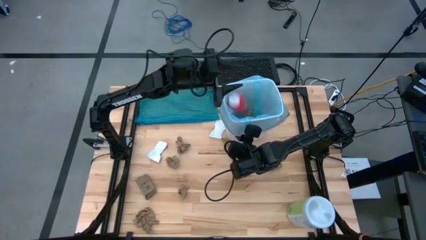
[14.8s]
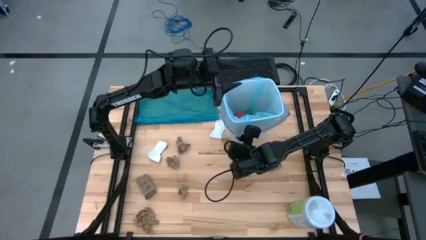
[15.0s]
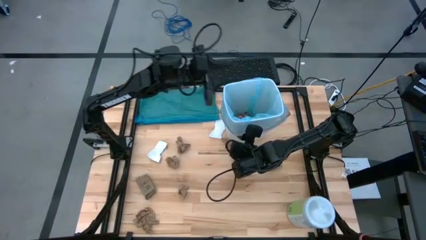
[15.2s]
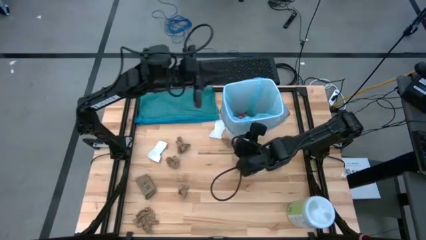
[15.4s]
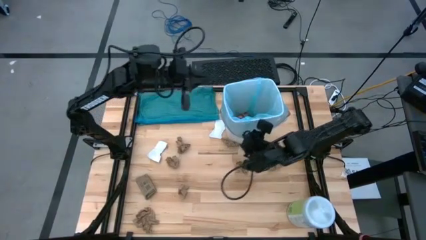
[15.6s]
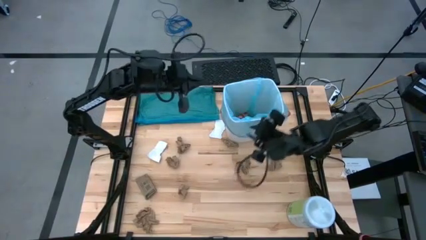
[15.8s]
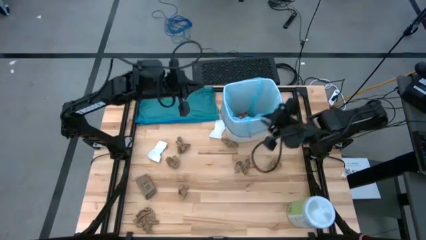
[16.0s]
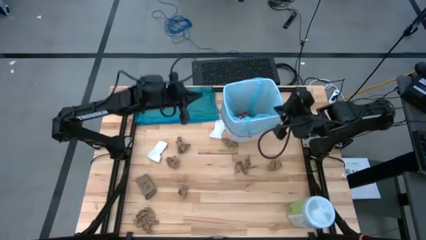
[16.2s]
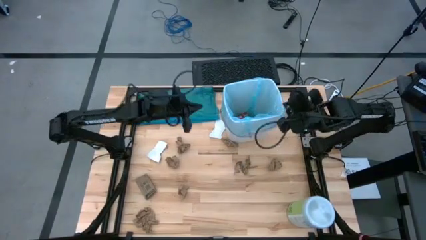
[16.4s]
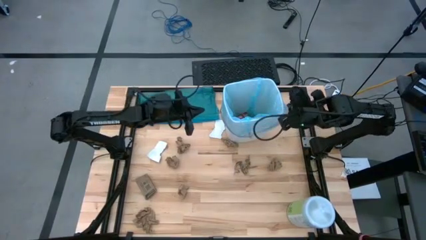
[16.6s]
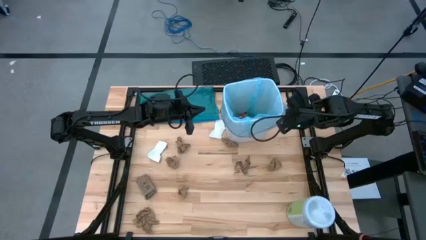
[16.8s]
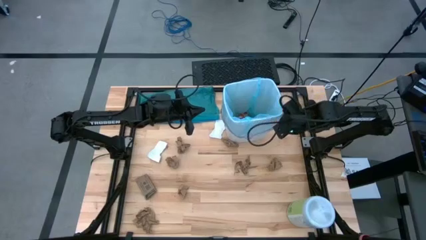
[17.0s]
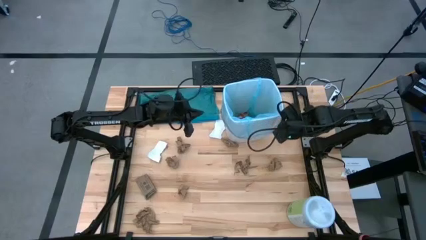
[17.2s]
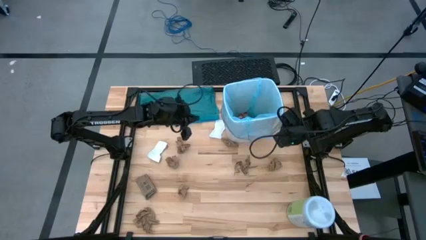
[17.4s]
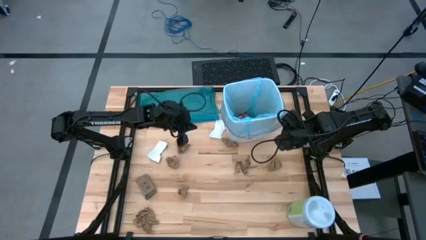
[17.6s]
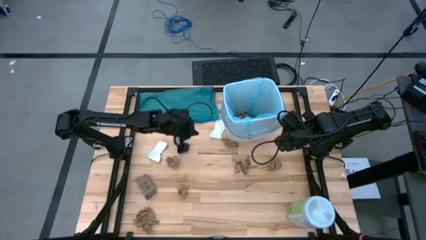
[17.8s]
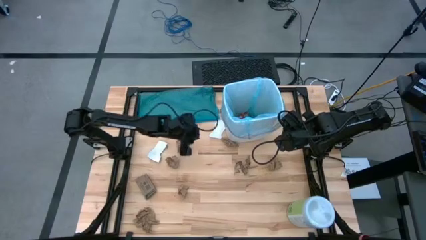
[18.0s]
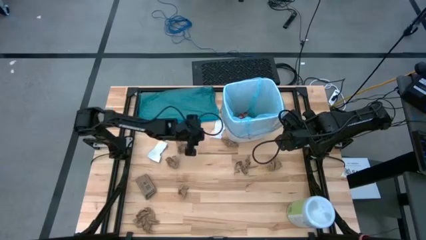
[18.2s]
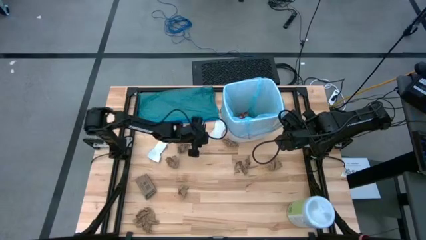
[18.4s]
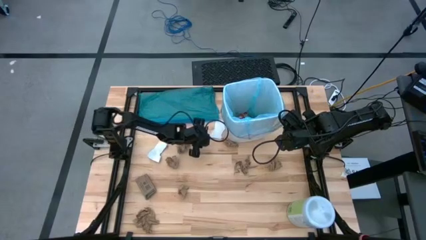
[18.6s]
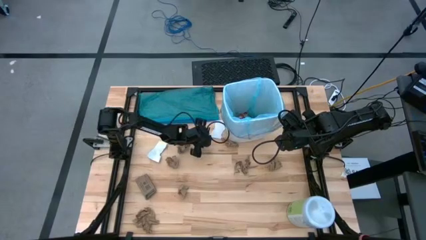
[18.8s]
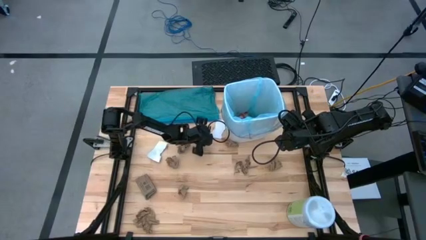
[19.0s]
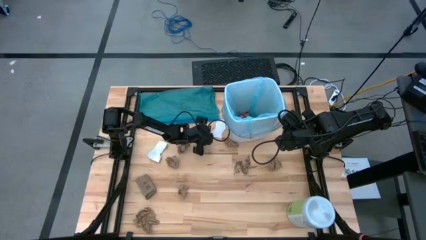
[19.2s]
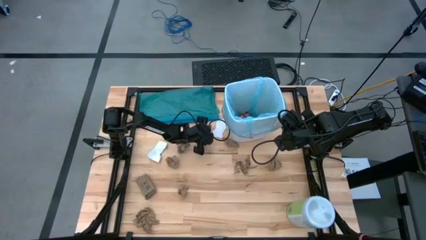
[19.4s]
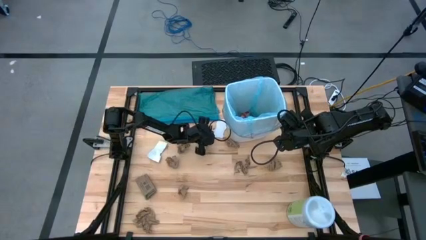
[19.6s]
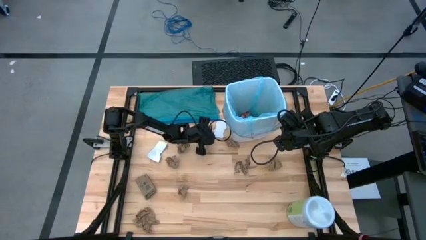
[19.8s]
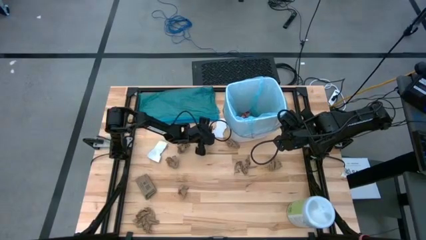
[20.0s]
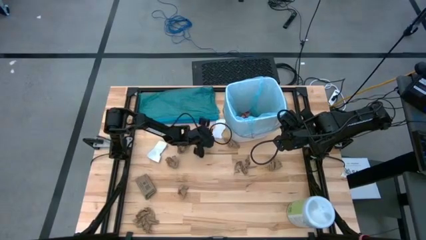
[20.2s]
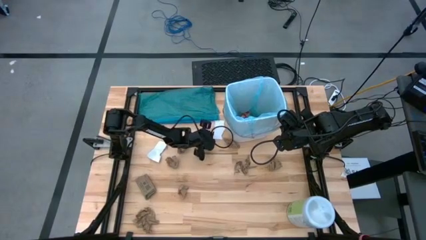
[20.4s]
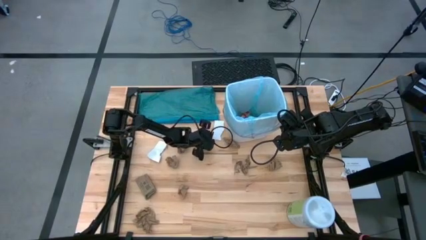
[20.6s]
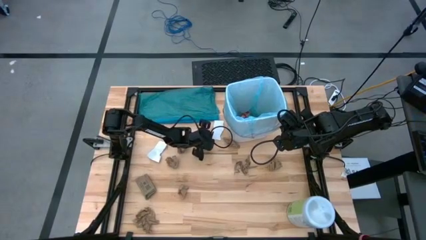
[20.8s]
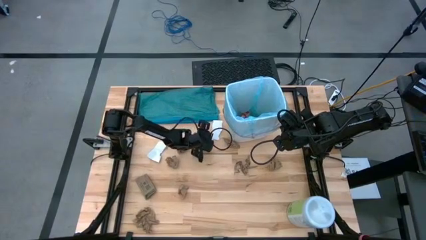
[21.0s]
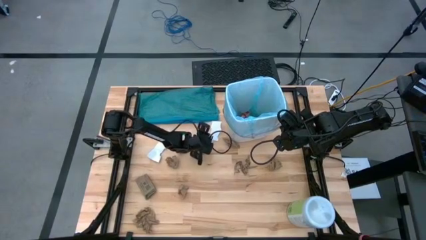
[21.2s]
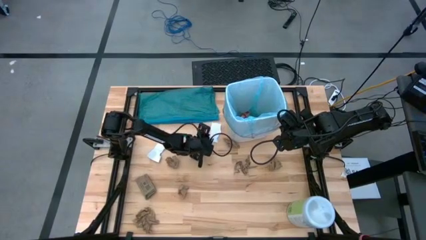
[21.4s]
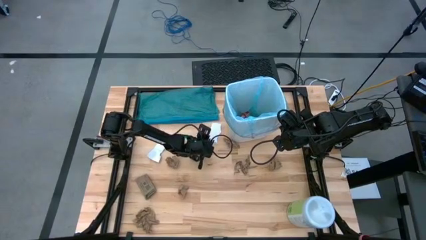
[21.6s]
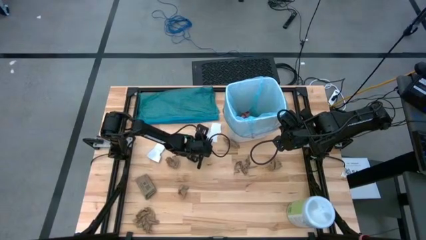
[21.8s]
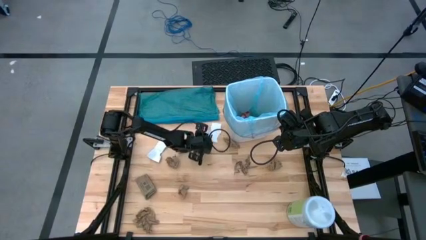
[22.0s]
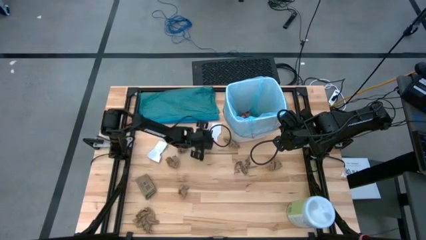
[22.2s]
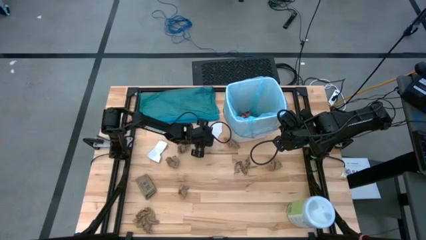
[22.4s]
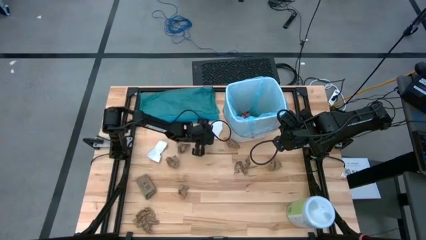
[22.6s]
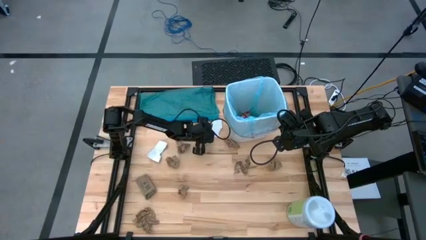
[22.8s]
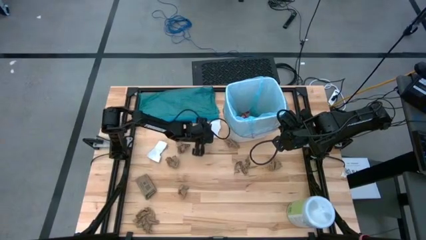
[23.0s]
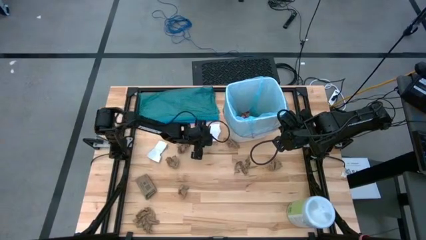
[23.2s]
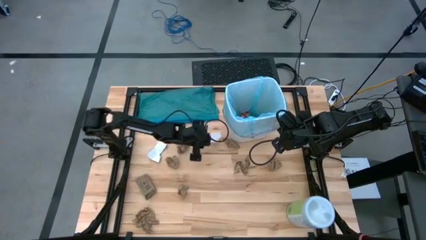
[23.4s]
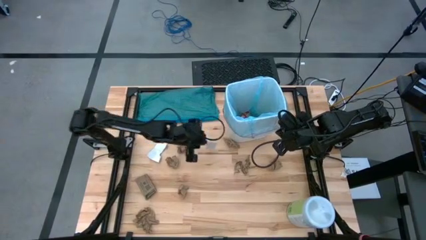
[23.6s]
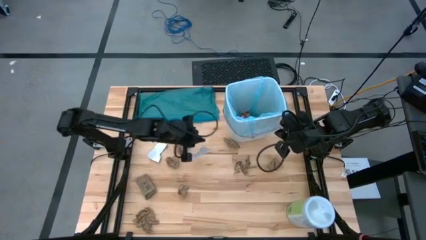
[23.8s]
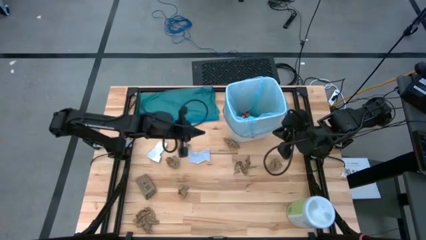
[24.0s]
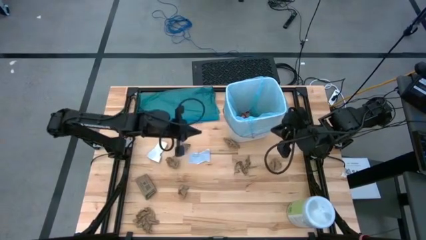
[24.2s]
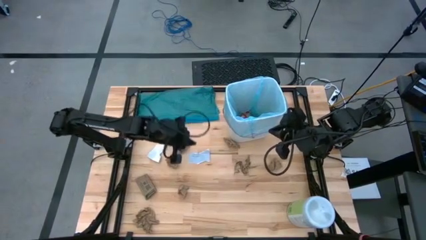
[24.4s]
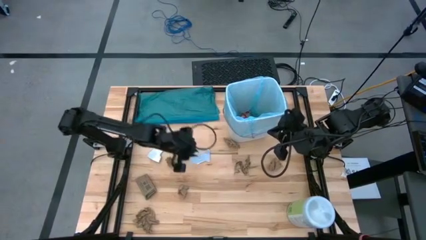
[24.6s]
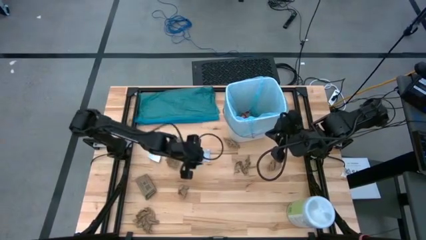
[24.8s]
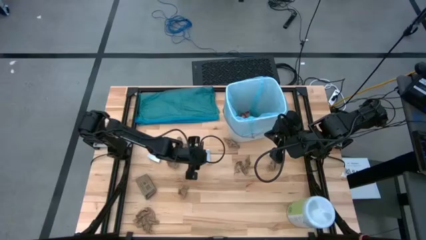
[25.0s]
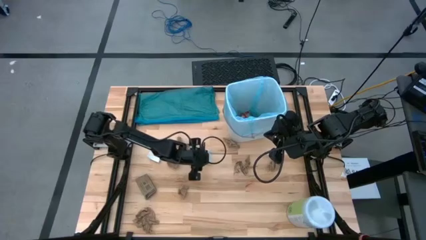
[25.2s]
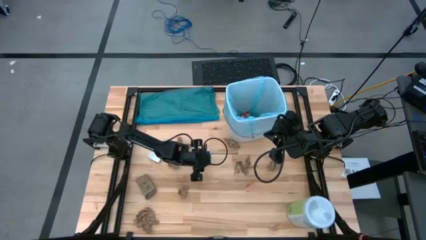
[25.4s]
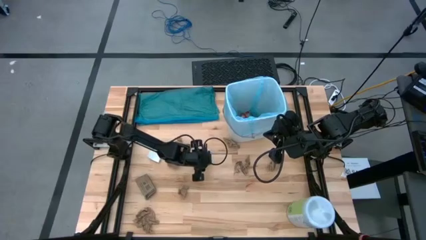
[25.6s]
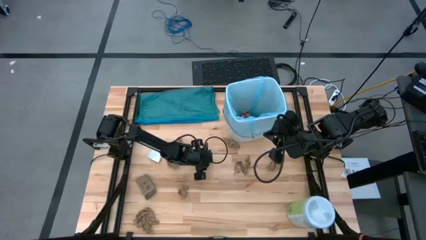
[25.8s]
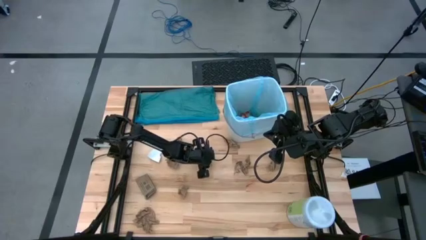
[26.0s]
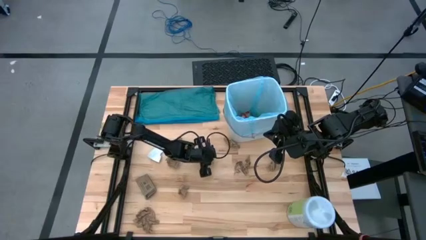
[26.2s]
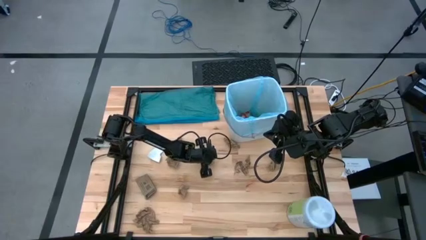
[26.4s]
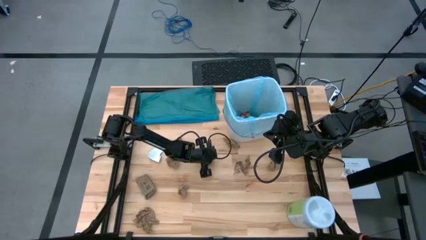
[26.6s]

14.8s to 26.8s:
Task: place trash/remove bag and relplace
Put the white paper into the blue trash bin

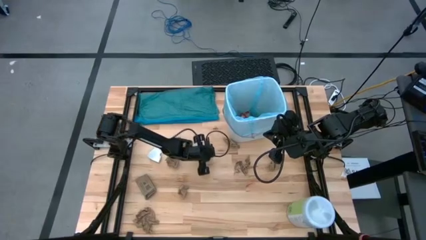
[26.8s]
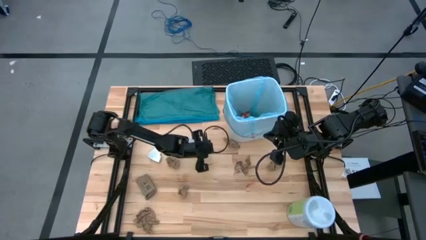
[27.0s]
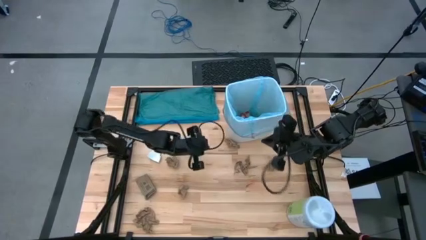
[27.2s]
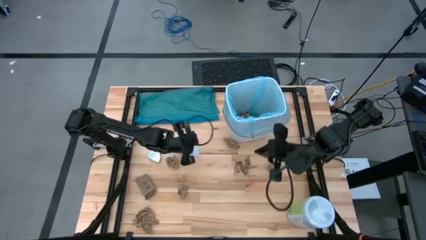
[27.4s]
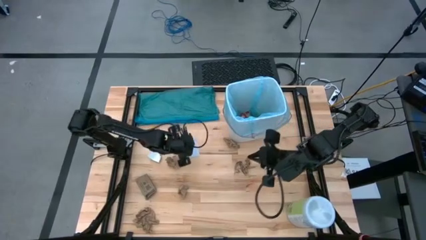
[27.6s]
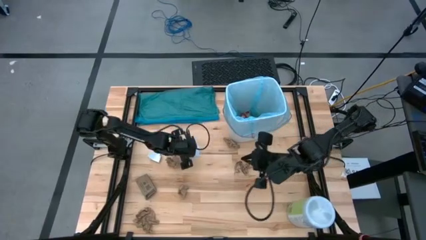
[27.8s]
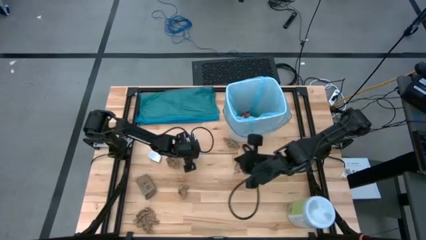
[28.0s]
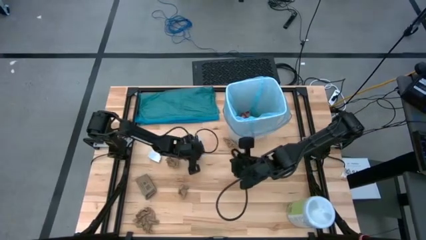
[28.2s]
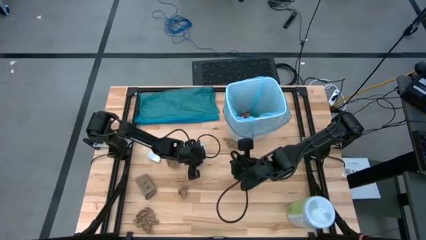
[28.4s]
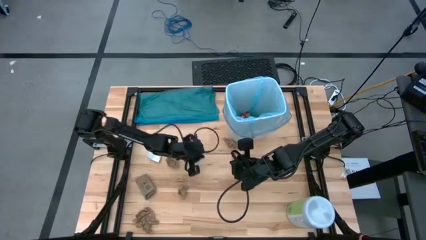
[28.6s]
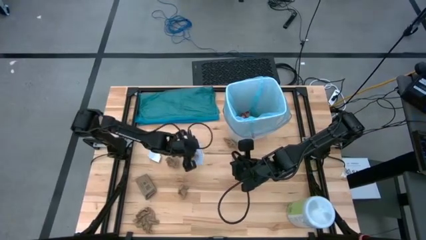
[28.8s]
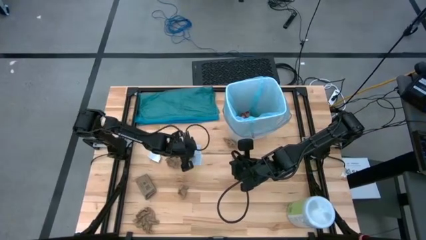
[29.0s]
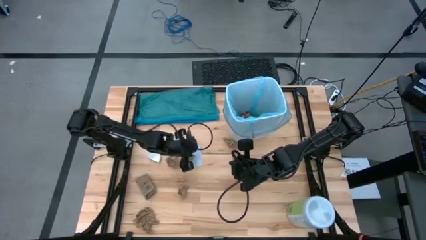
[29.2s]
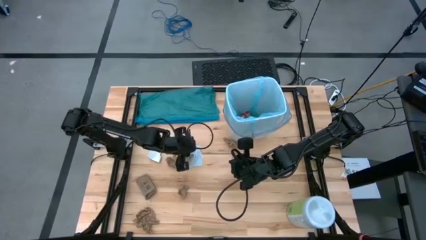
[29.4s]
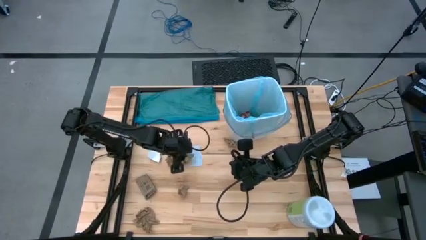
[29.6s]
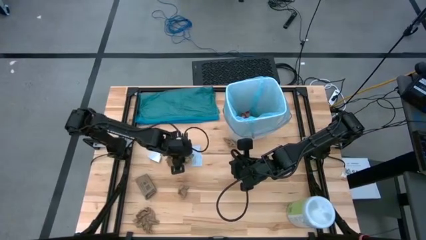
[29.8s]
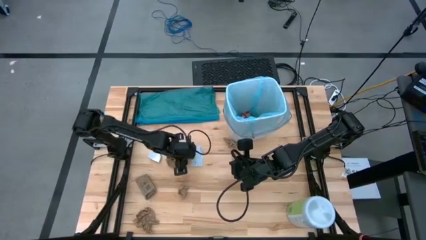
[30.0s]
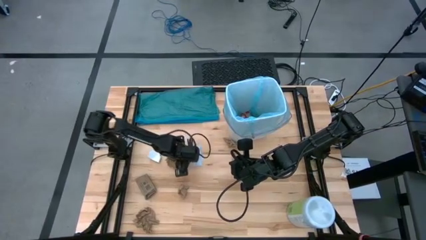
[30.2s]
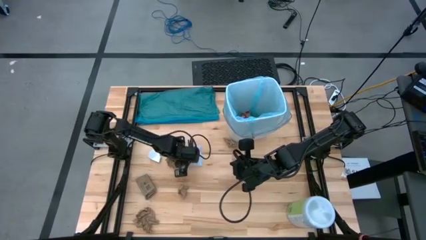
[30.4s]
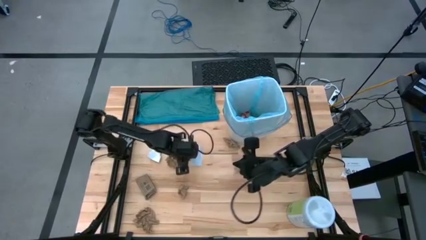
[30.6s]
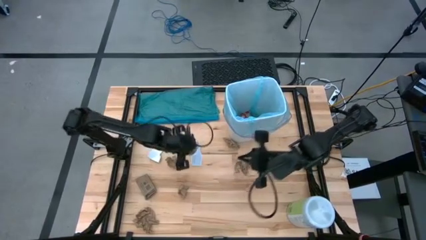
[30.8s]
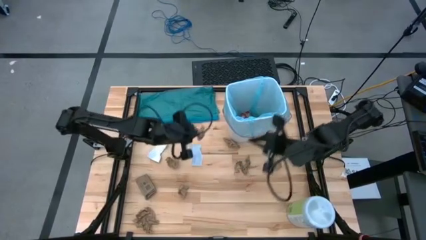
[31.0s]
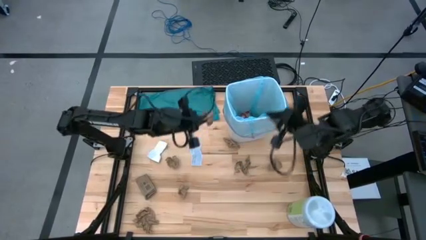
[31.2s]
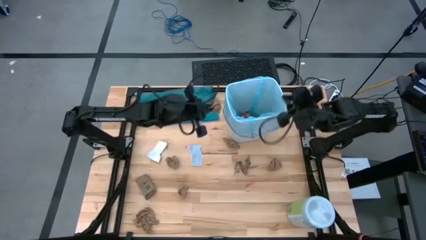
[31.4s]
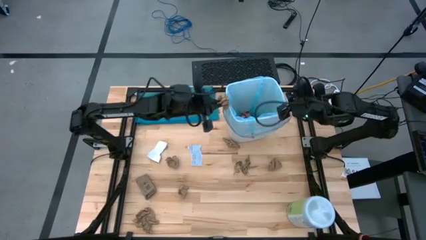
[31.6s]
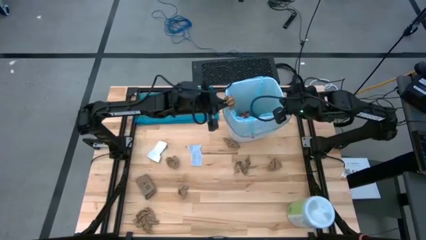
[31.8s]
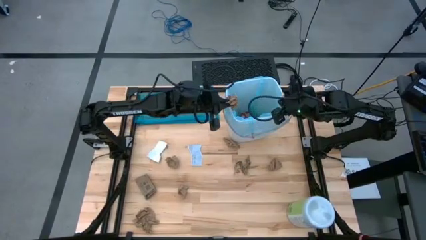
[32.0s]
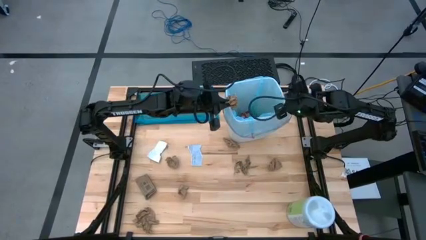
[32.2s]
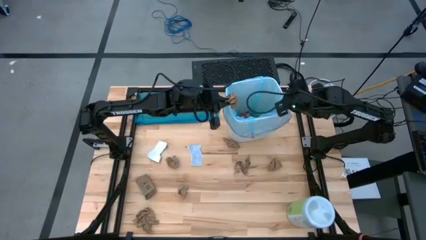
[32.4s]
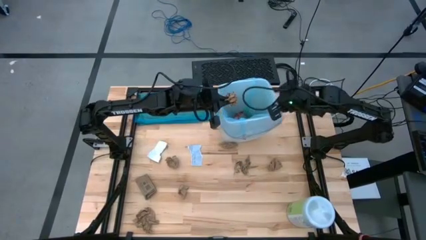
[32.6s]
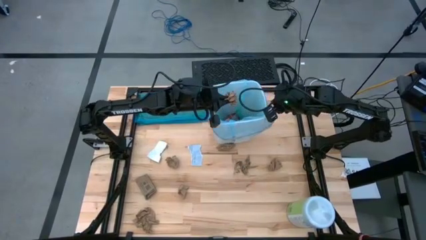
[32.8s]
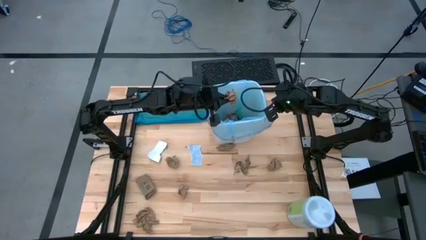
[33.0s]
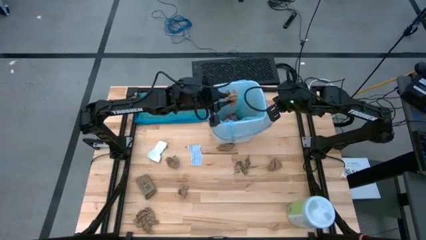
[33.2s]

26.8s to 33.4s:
Put the brown napkin into the blue trash bag
